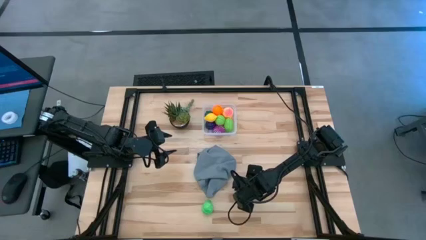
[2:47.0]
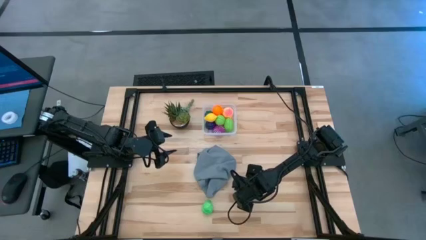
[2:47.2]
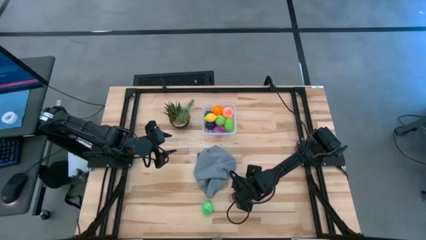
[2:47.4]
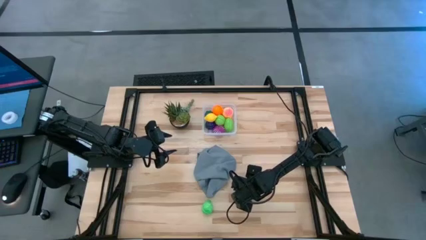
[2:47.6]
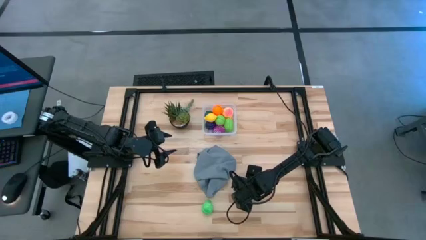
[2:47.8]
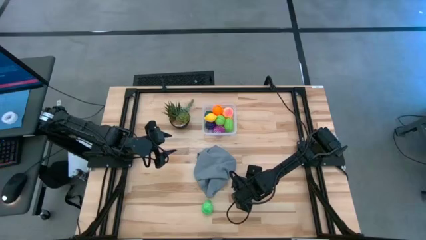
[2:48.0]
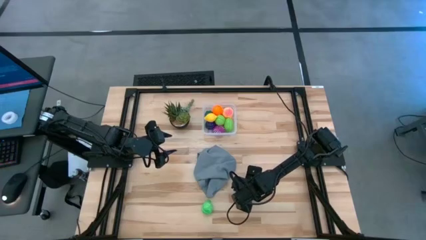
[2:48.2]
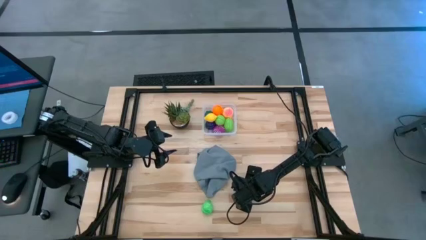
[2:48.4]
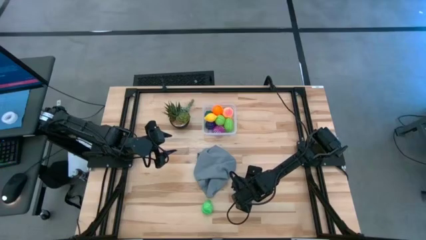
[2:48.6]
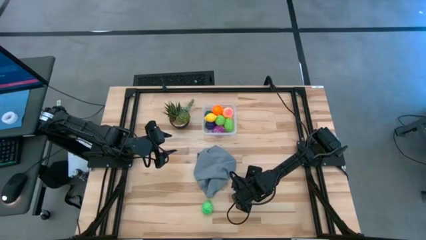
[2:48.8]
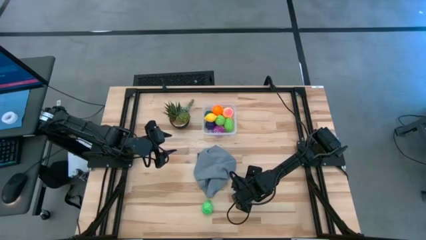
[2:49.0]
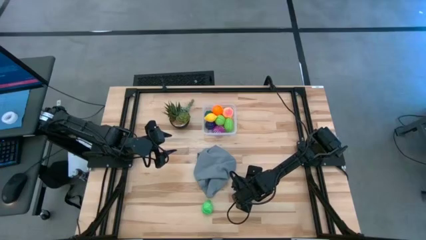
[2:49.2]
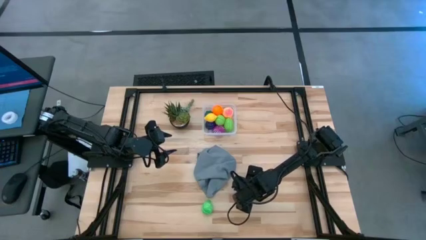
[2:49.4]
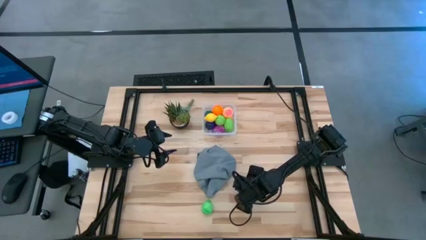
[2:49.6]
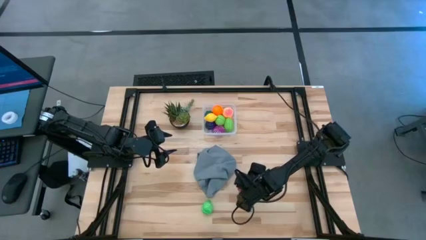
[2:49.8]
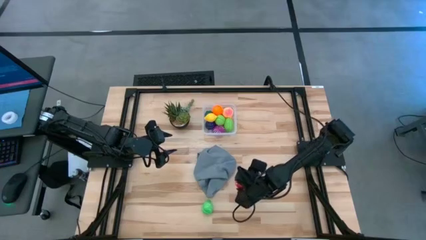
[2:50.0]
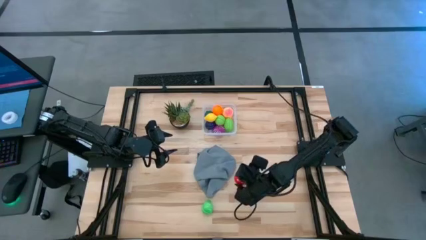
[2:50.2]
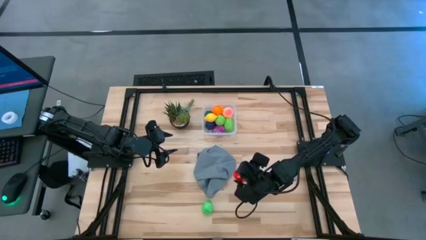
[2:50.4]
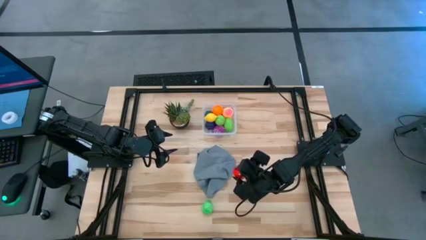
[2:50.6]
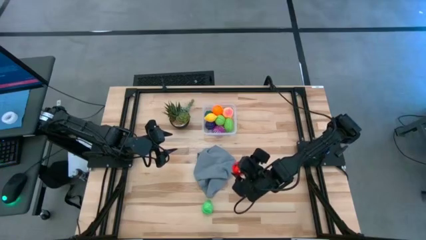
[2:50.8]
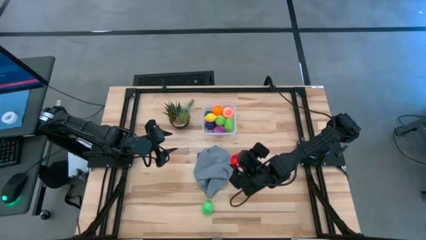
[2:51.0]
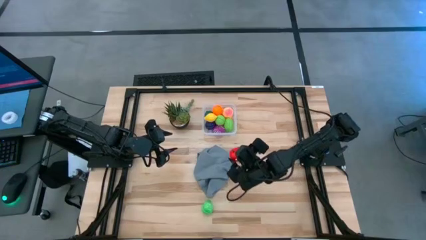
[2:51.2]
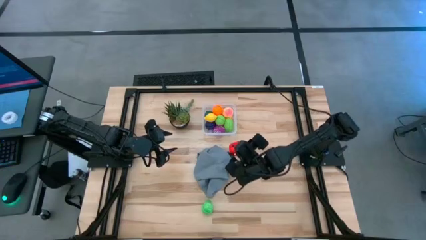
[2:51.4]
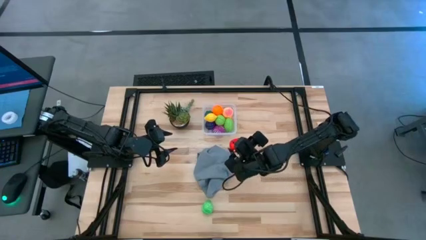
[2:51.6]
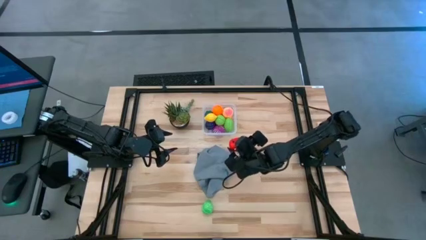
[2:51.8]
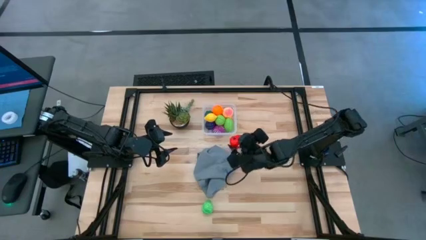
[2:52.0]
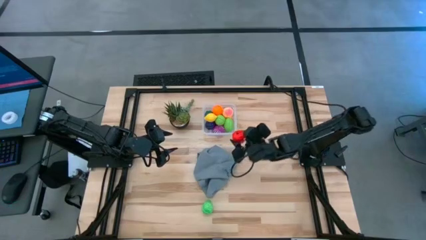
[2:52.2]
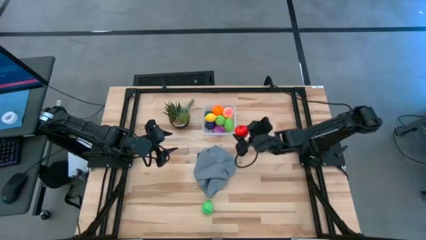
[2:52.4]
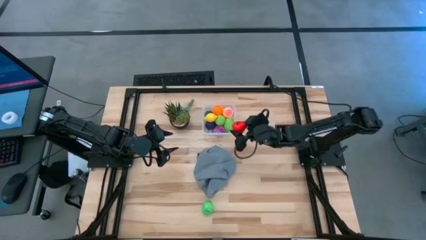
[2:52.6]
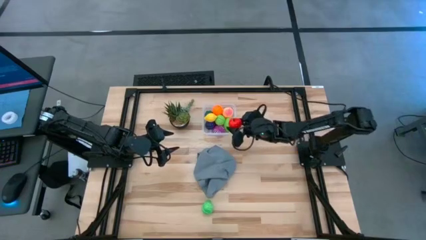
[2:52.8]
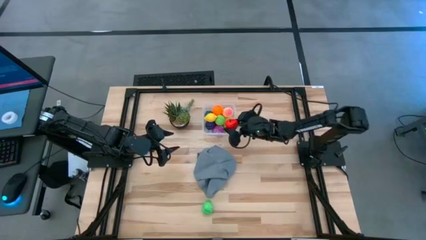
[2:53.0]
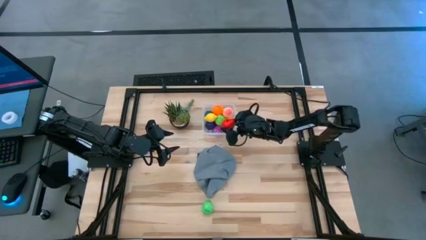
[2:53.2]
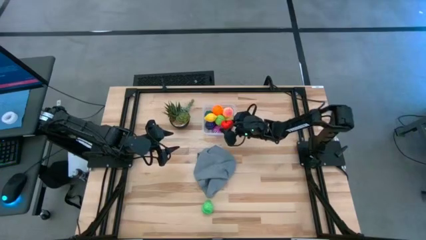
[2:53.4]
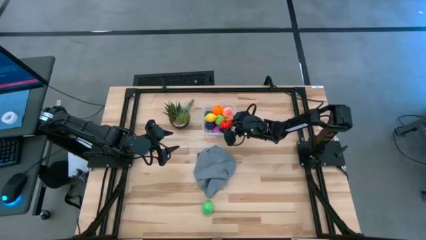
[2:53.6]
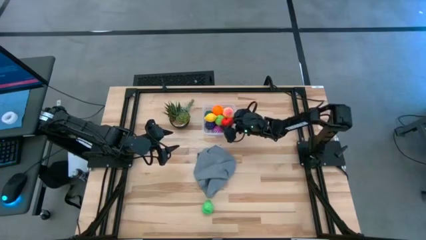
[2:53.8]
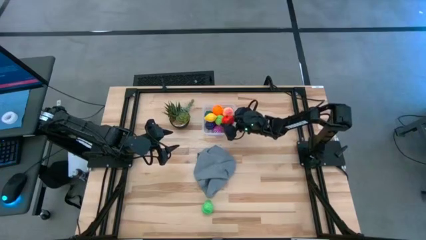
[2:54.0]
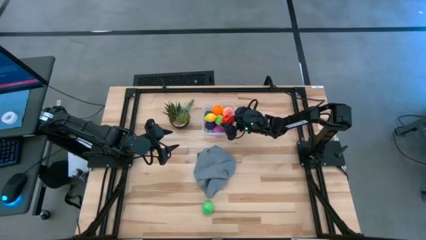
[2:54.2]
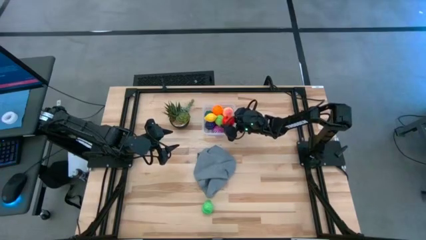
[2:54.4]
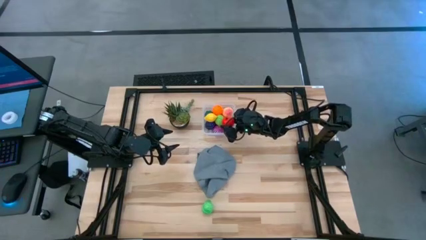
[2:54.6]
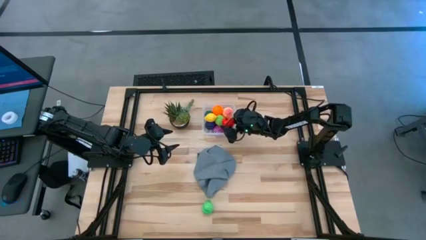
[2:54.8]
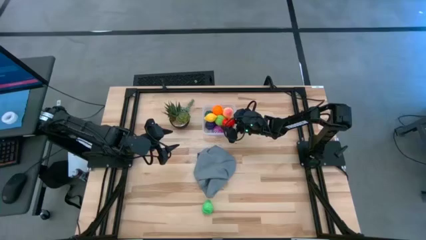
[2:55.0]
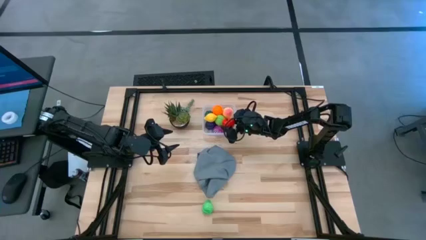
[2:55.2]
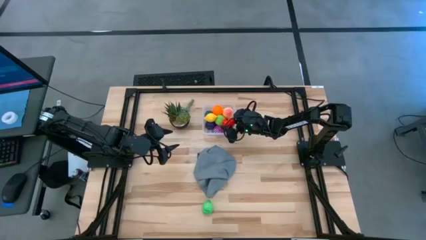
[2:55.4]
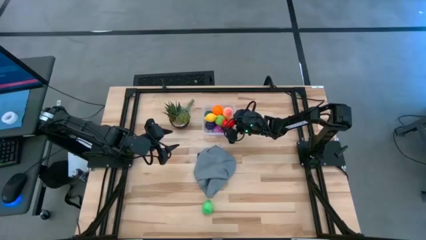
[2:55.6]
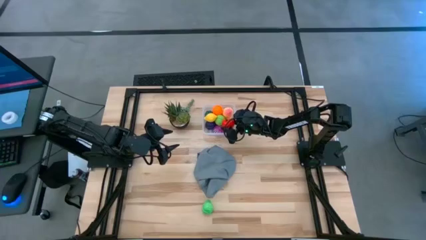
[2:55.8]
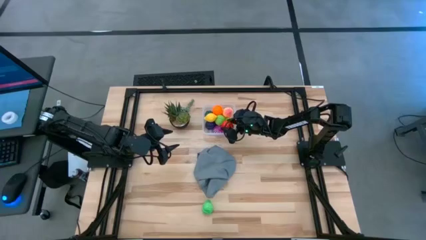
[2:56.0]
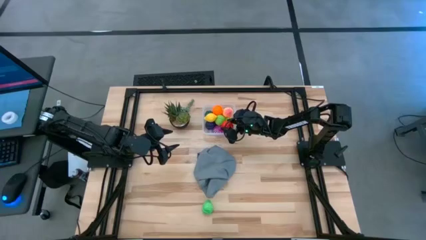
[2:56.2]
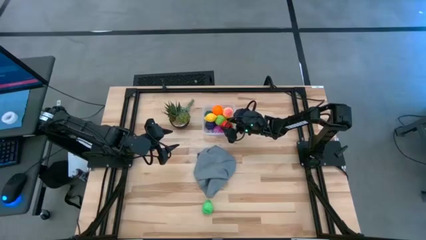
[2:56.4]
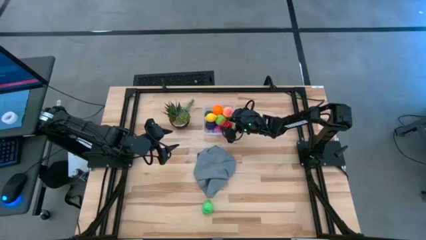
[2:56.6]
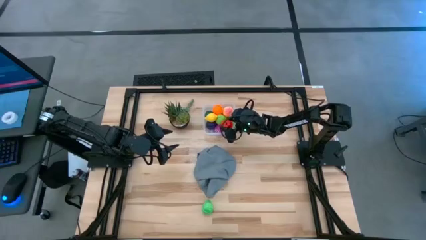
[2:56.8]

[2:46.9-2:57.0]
Task: Pick and placing Produce into tupperware
Put the red apple into the transparent container

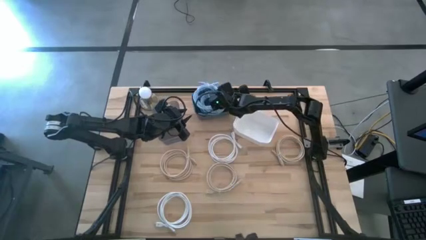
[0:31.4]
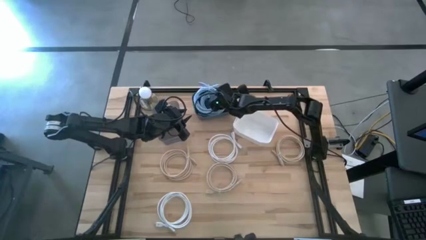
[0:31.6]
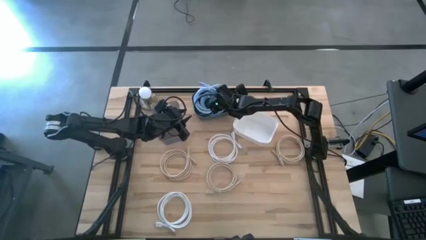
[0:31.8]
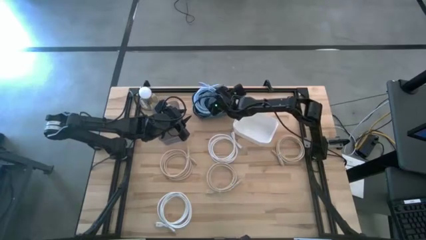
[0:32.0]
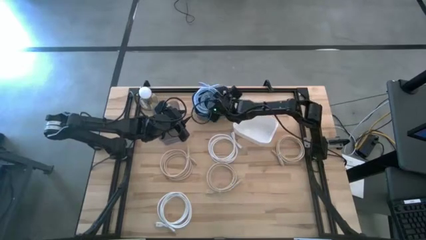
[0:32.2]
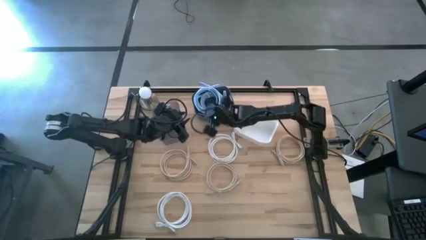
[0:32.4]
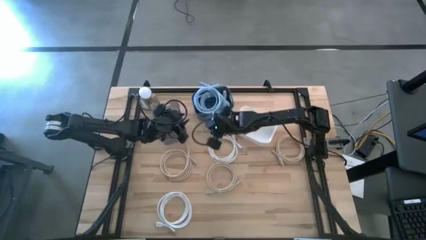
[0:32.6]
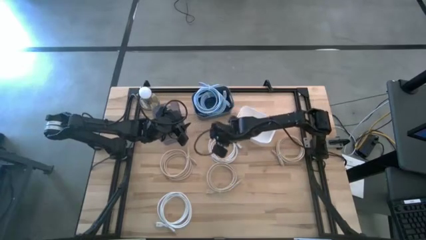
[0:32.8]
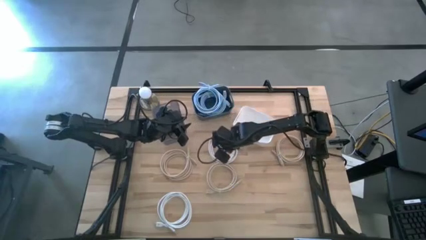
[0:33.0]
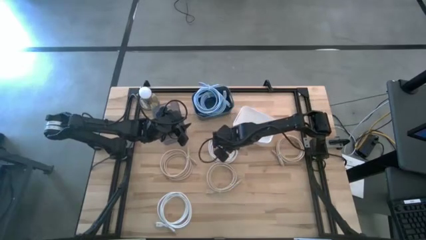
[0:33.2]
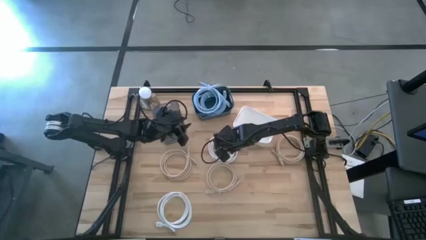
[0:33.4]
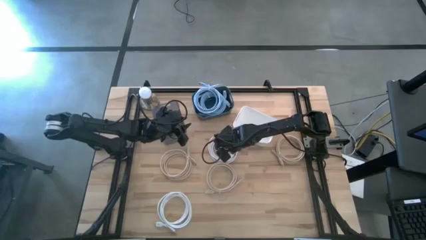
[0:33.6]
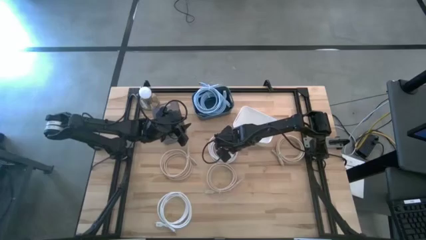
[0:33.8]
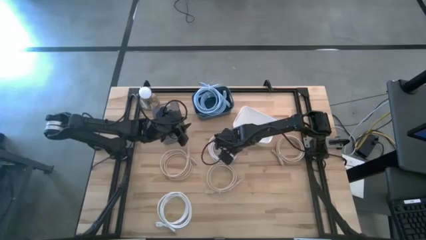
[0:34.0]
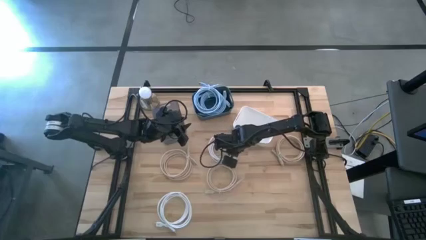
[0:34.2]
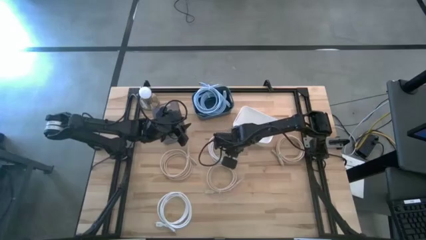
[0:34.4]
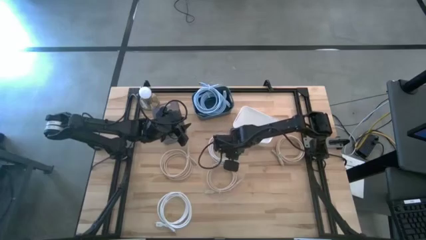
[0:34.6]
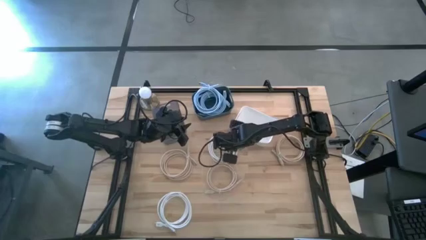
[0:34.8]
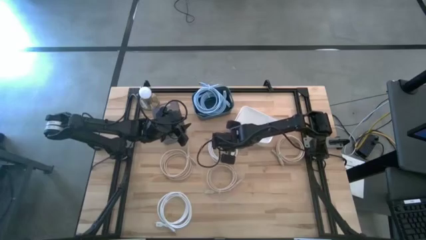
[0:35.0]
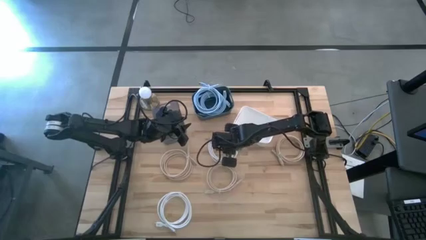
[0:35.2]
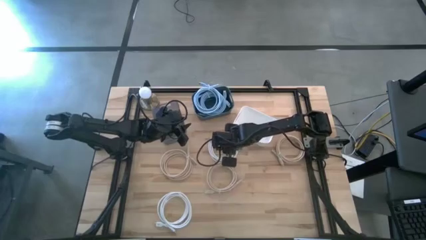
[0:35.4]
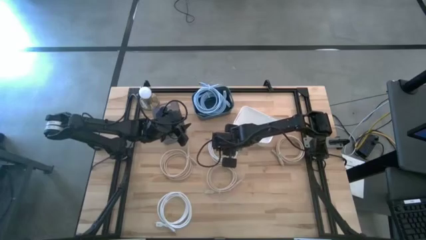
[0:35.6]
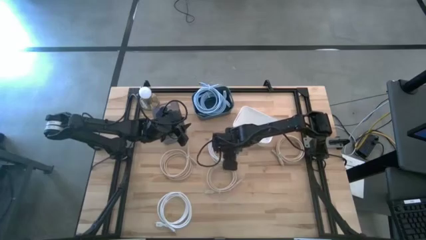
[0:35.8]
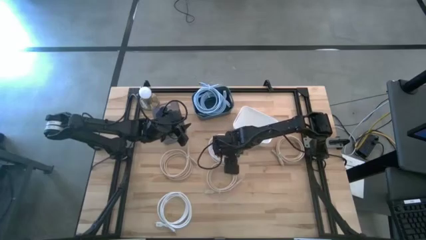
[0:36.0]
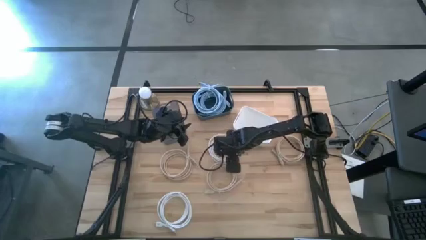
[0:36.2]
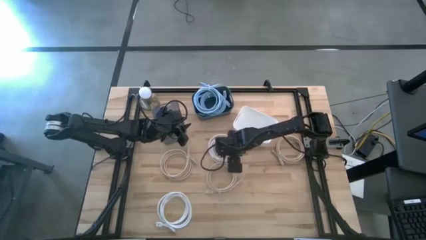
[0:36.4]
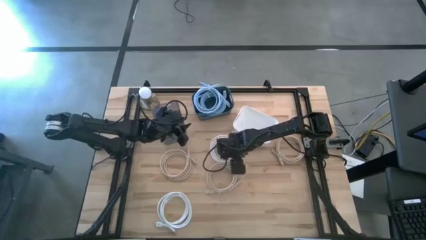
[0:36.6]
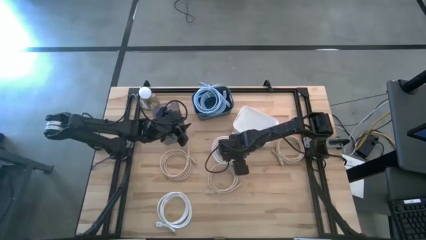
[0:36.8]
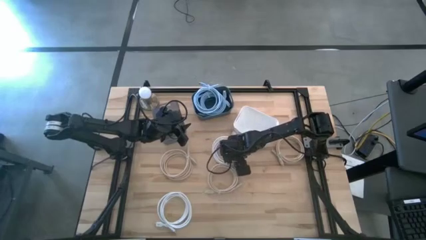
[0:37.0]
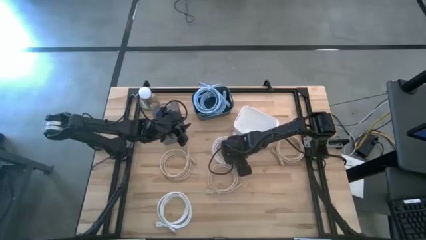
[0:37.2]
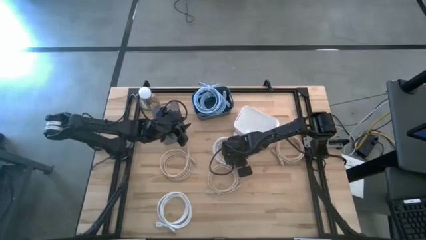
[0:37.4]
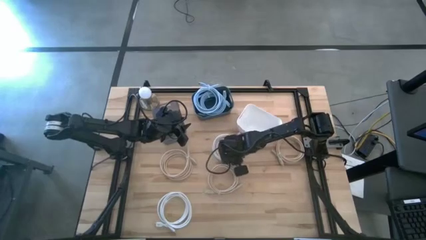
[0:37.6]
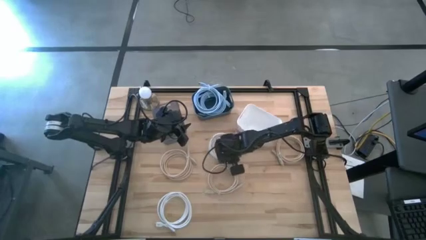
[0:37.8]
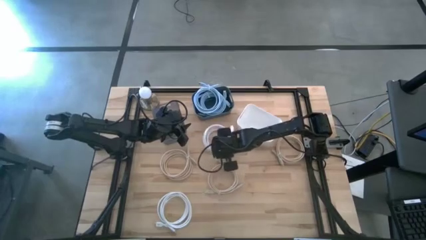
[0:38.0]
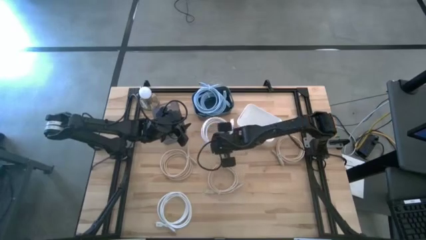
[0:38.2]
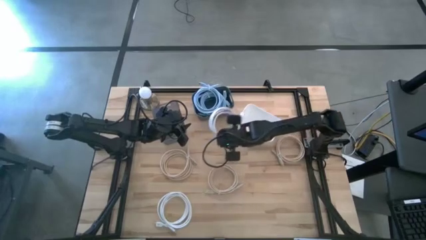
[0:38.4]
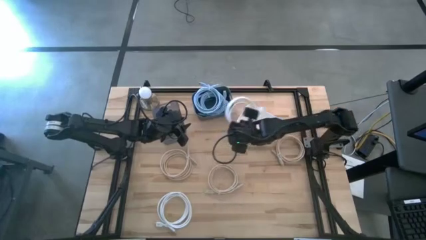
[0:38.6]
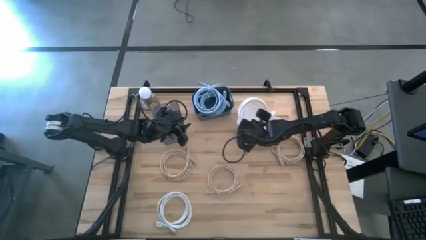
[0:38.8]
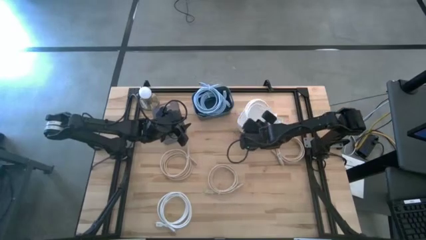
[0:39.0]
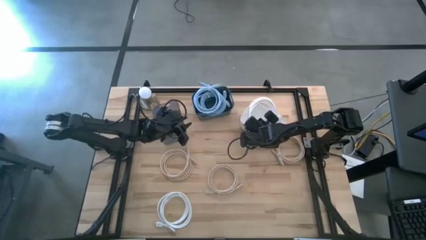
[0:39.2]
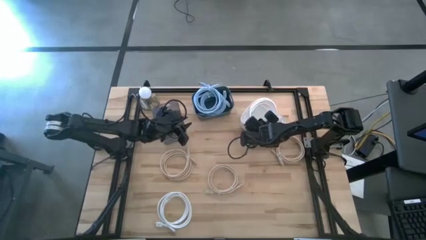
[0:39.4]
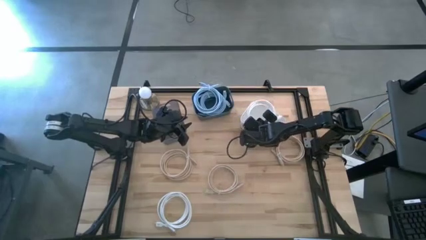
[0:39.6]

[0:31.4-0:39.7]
Task: Sort HDMI cables
Put the top white HDMI cable into the white bin
